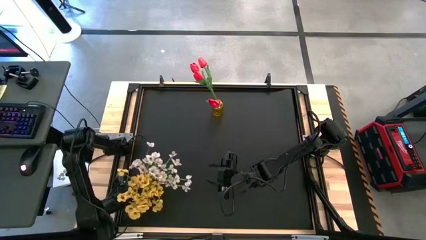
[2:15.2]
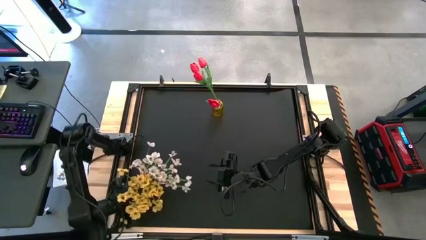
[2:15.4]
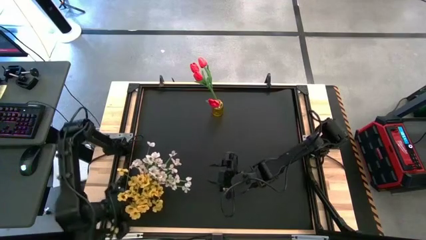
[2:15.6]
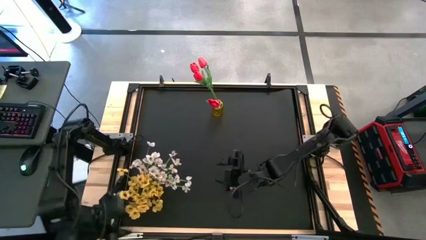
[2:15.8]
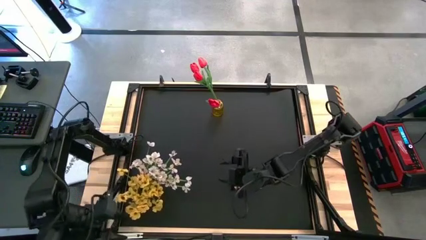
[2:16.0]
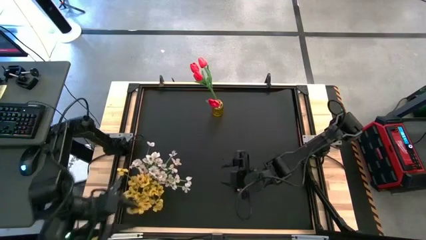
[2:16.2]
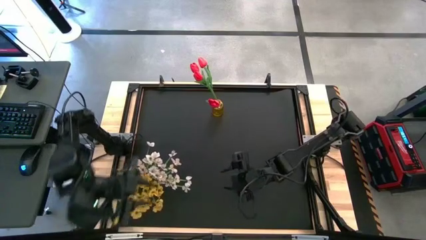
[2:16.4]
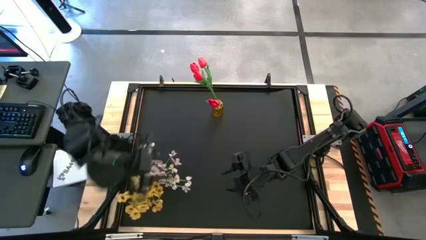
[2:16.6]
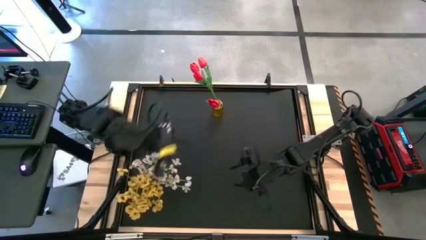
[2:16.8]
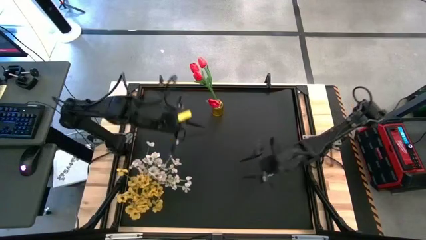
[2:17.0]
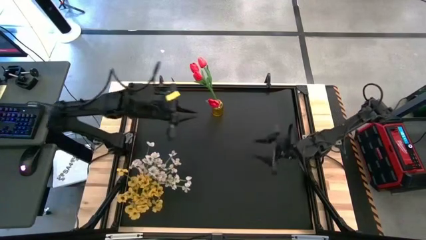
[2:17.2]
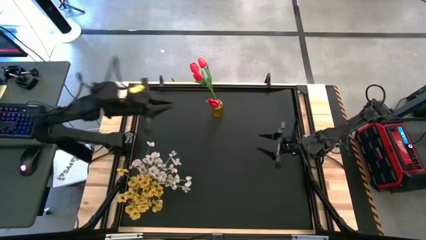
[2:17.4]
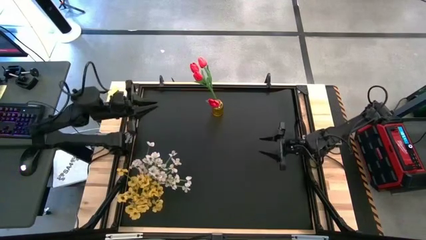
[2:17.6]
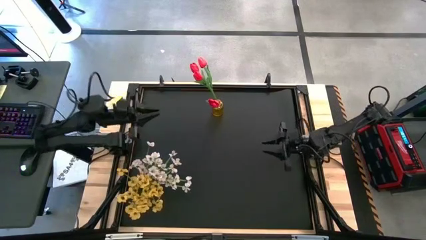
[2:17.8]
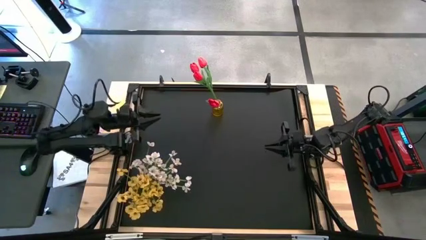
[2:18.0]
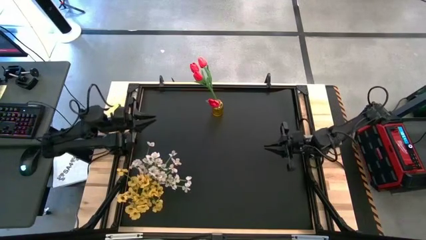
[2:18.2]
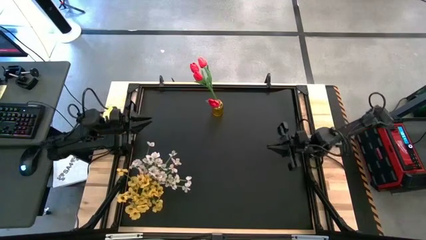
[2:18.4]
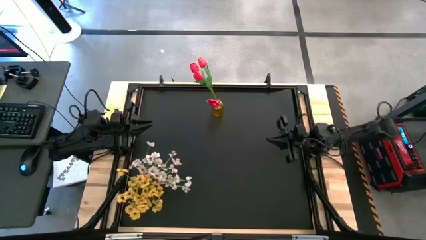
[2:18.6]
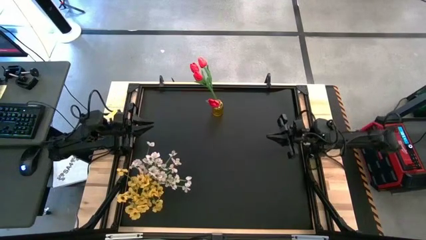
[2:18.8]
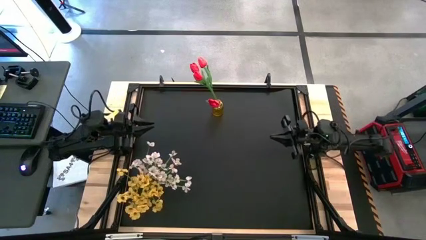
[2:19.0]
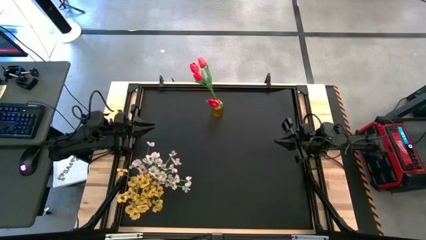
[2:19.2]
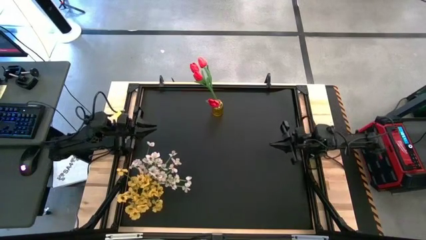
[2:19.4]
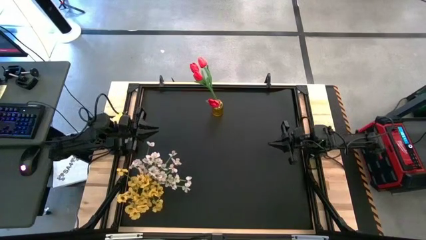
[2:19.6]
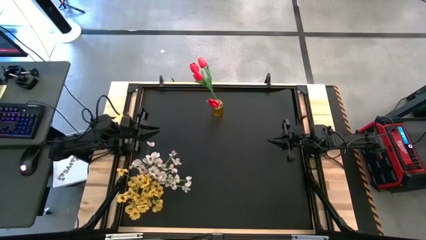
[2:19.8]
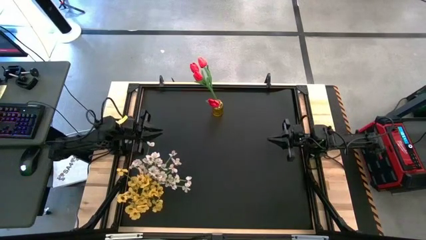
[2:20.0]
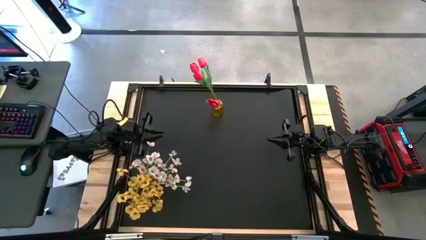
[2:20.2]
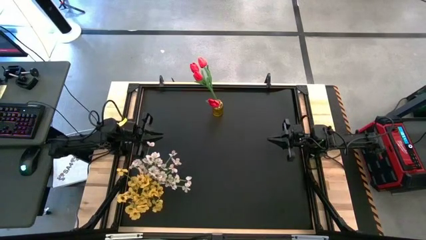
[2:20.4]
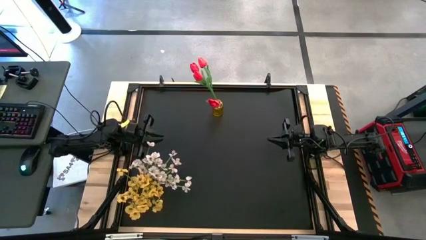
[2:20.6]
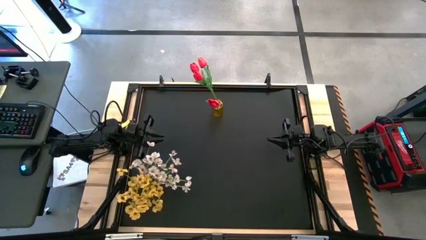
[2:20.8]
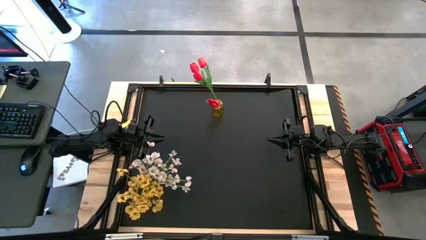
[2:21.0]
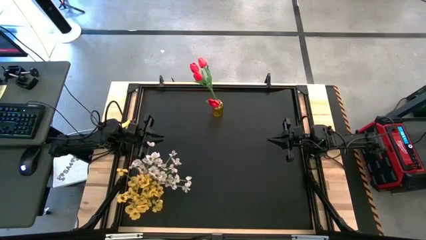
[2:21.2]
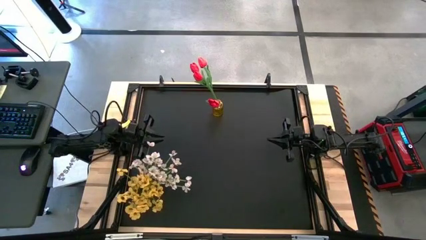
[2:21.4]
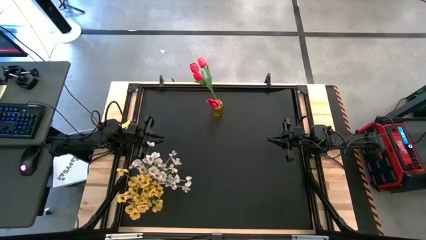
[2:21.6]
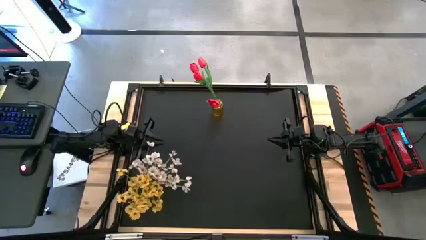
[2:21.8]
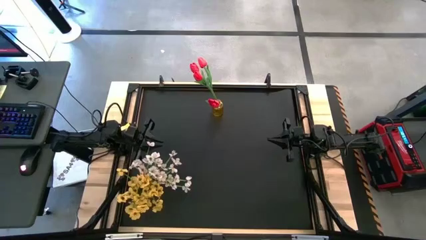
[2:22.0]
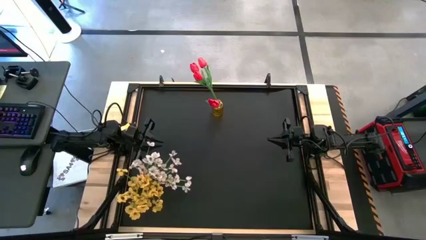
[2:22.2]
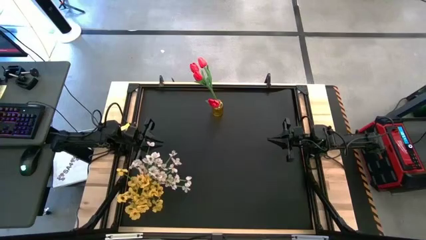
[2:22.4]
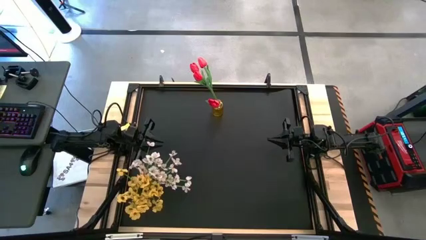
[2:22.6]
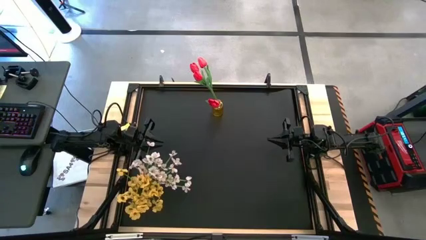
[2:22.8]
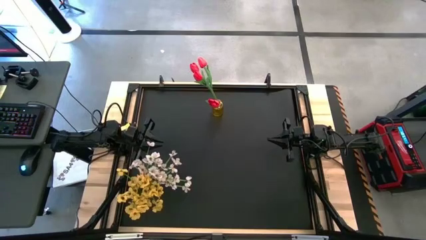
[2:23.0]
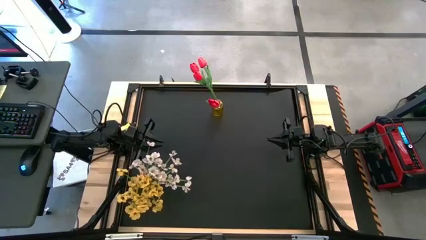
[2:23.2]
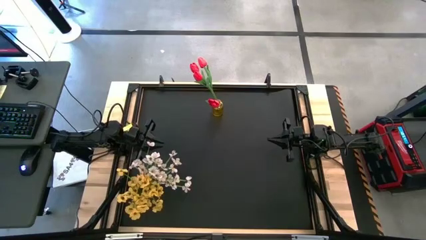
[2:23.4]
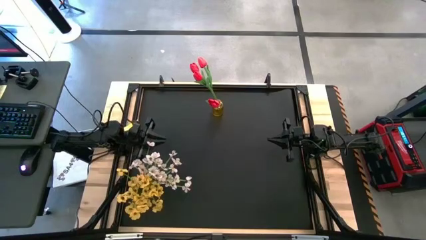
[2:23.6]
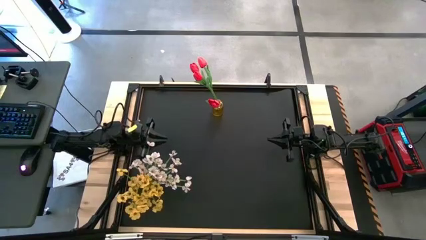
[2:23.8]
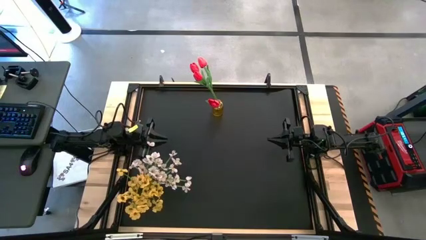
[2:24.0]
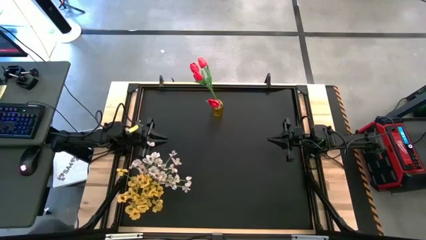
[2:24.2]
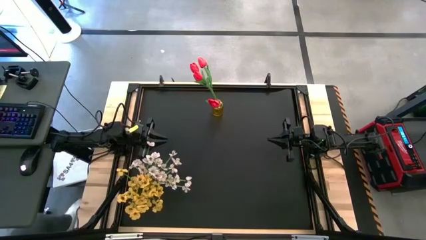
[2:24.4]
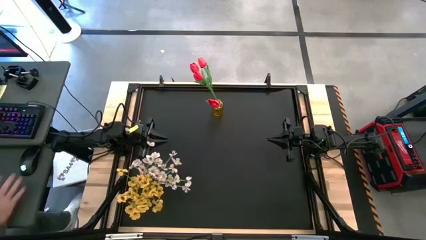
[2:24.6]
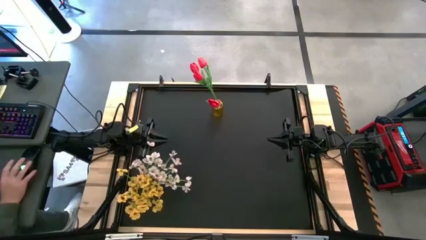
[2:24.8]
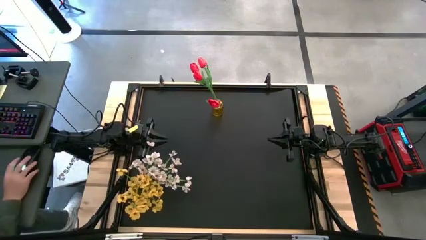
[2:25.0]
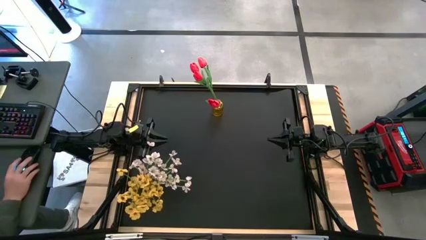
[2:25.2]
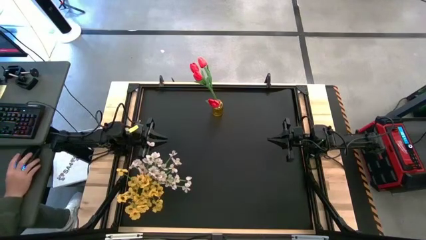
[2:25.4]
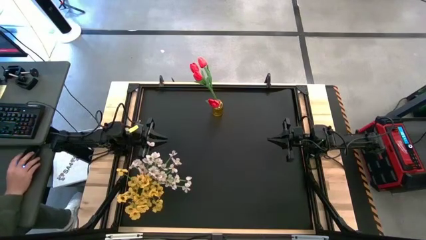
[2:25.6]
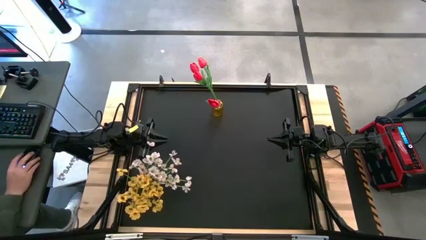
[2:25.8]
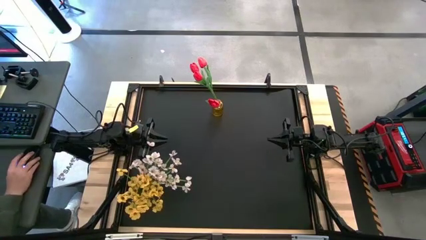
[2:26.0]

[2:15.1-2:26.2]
Task: Sort flowers into vase by color
Return to Home Position

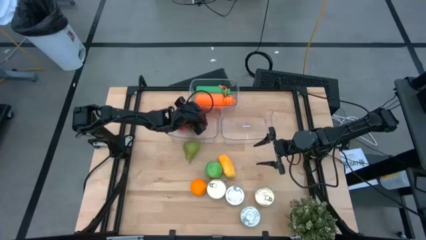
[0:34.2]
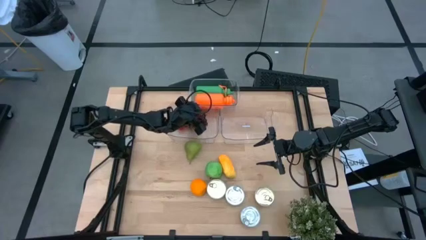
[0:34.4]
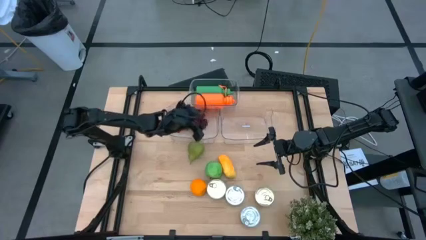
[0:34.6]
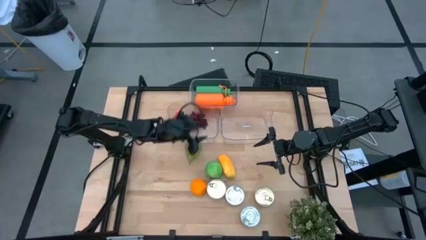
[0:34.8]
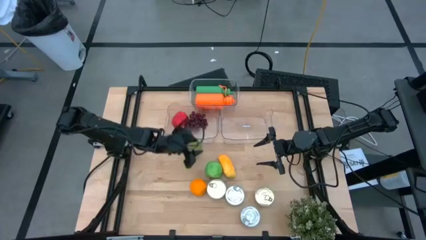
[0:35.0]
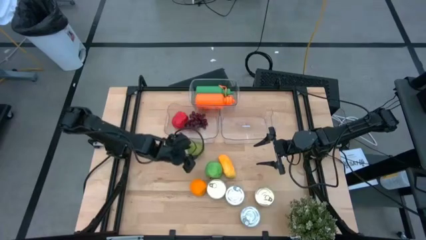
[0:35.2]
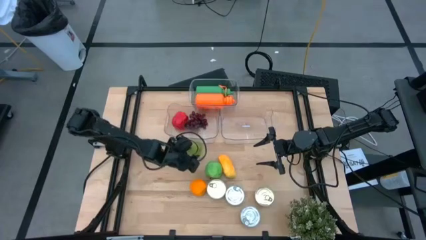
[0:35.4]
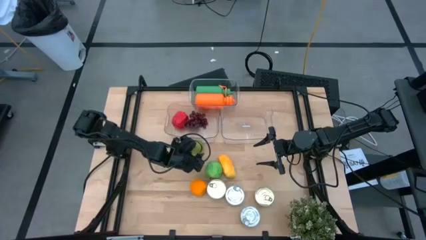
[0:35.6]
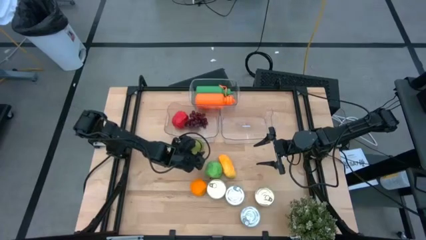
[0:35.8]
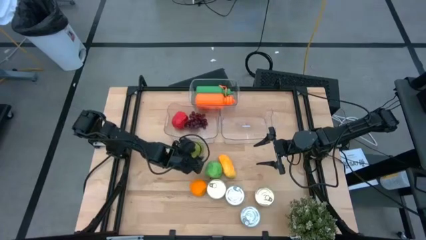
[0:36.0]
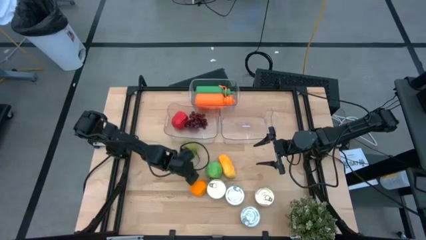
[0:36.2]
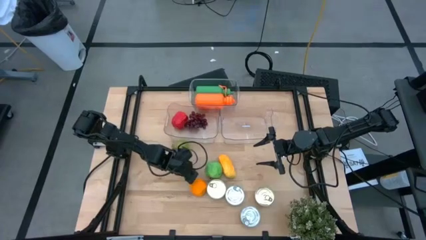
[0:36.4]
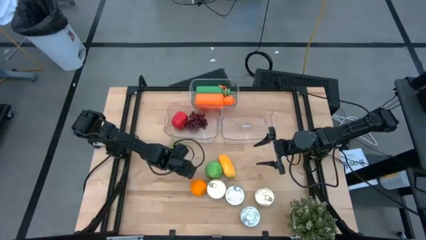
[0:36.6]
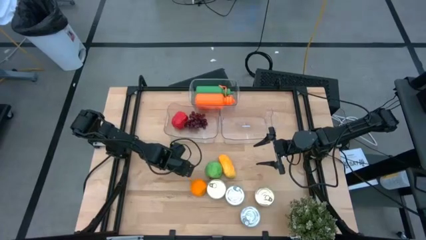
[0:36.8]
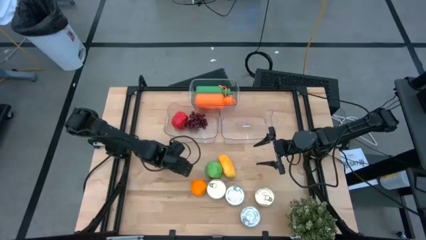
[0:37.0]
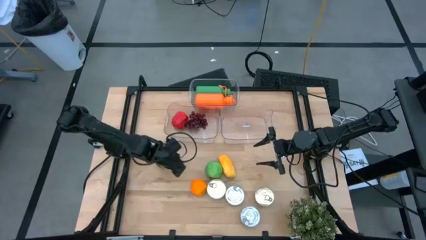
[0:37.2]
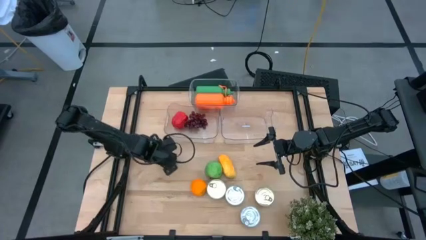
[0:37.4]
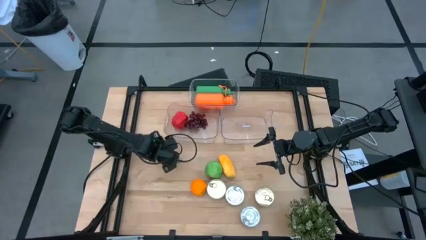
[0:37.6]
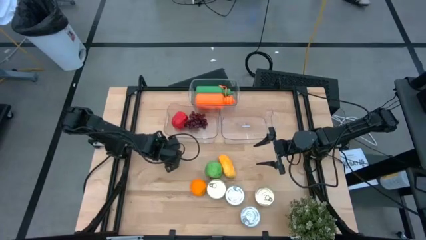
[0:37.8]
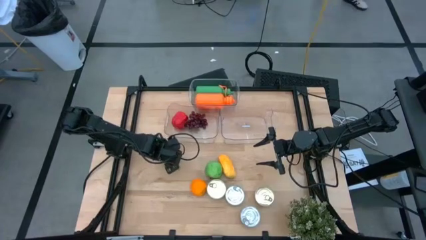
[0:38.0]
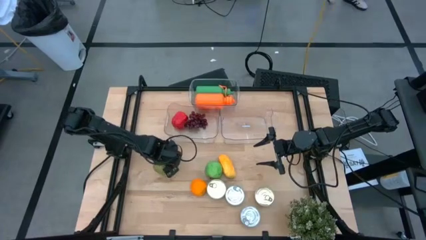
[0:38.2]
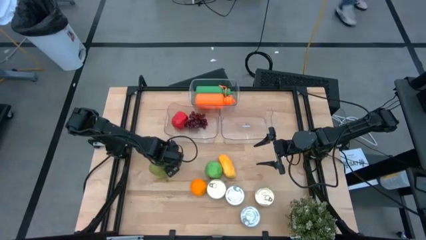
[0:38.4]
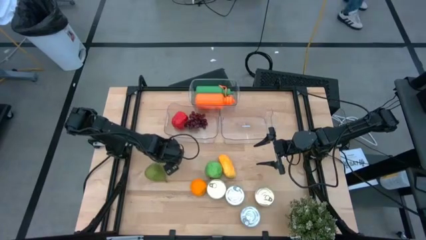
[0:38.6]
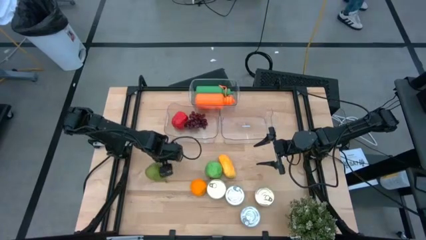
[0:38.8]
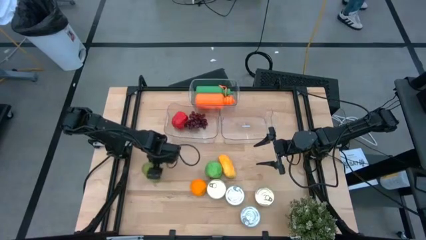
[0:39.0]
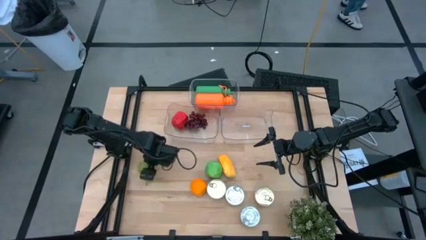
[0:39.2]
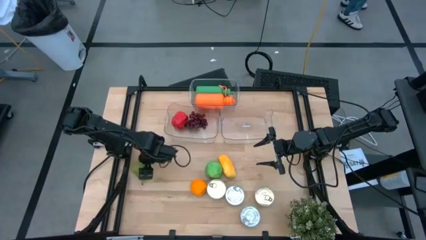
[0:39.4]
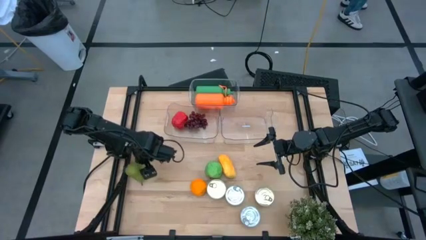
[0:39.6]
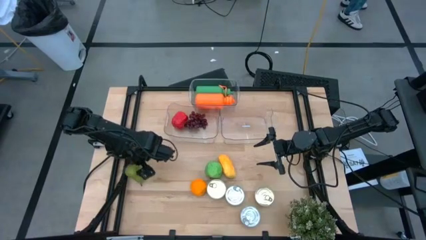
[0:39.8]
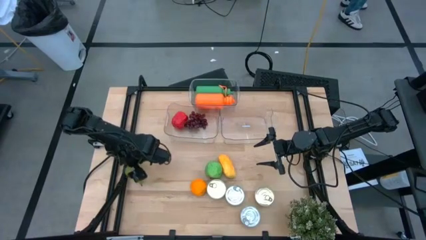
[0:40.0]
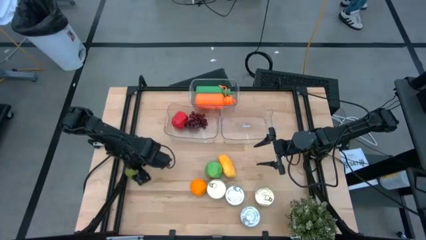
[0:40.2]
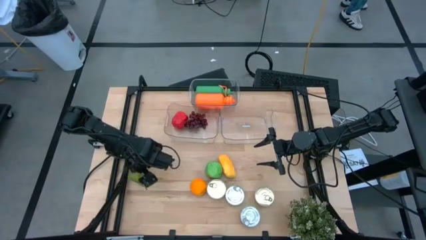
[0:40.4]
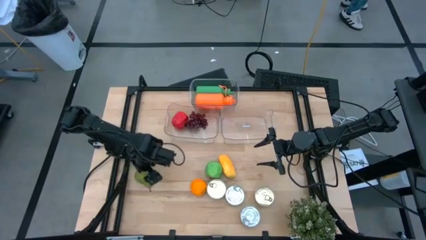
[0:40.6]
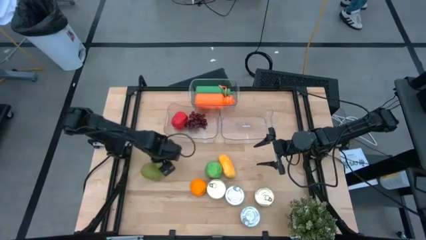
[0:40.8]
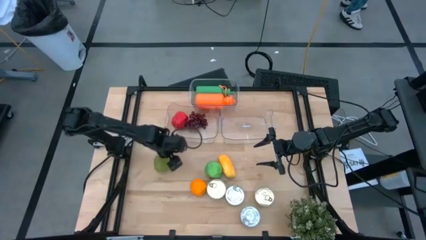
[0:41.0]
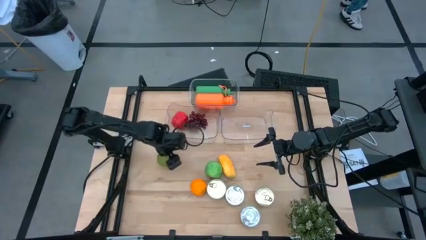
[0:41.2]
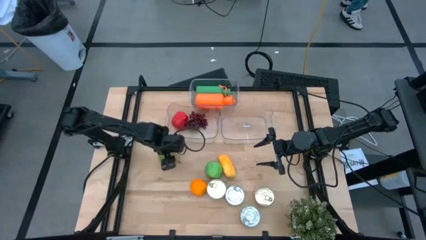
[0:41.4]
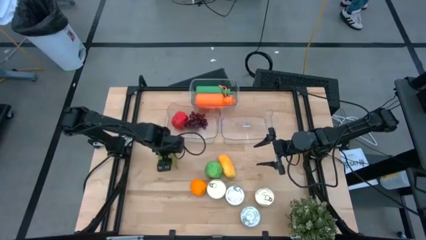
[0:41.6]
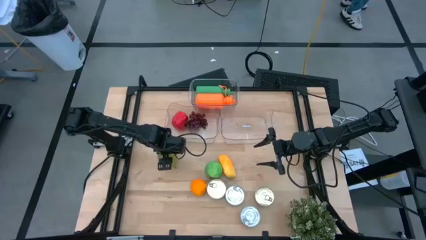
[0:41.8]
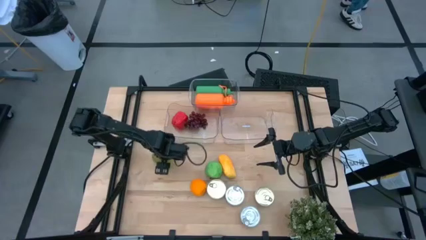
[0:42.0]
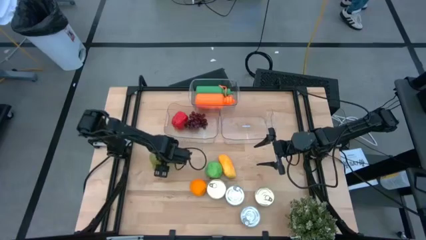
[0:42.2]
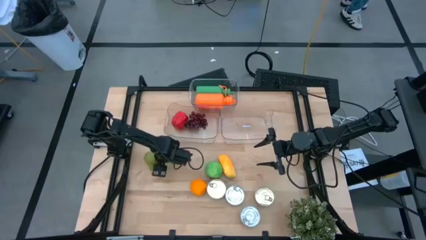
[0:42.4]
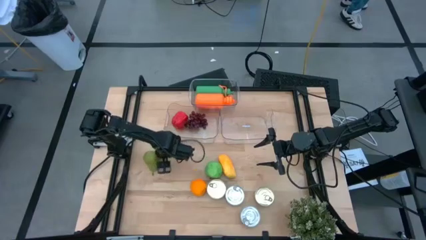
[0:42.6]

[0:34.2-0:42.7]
Task: Pick & Place Food Item
Put the green pear into the bottom left transparent bin
